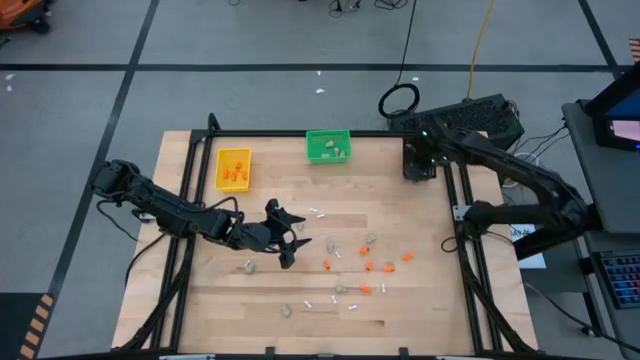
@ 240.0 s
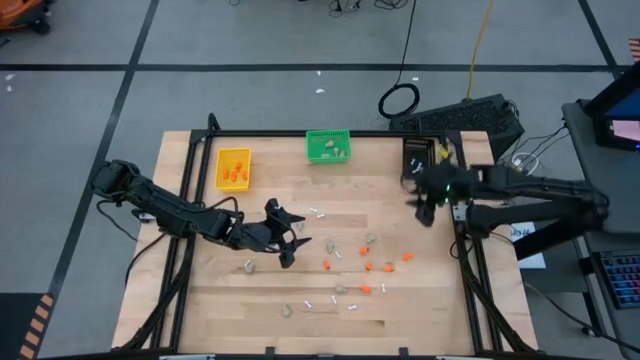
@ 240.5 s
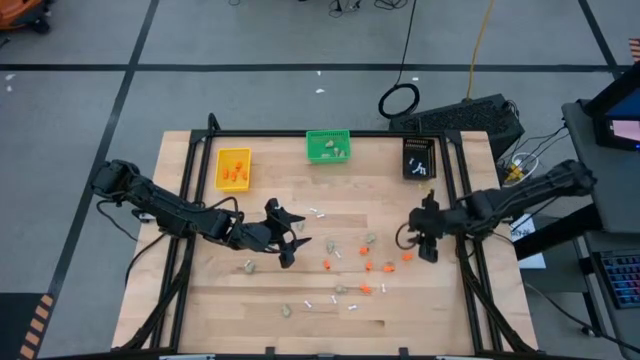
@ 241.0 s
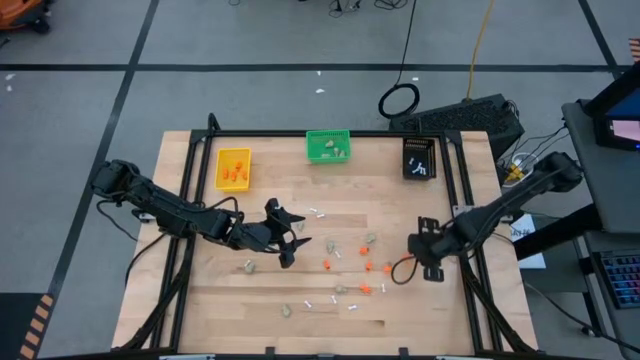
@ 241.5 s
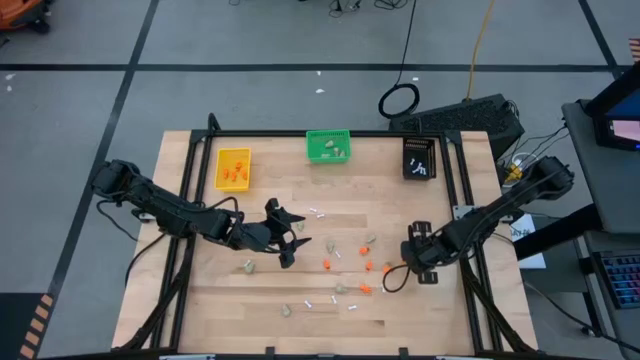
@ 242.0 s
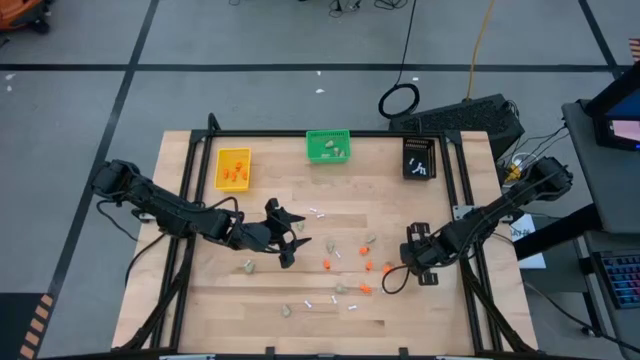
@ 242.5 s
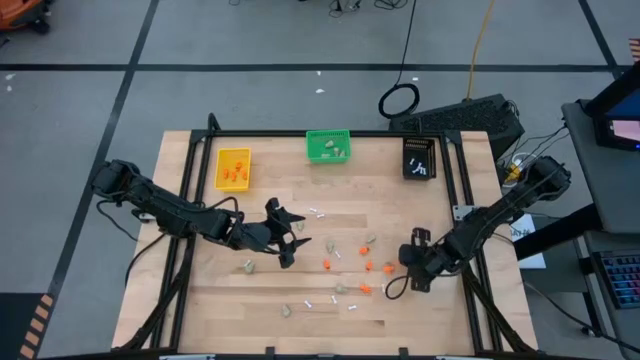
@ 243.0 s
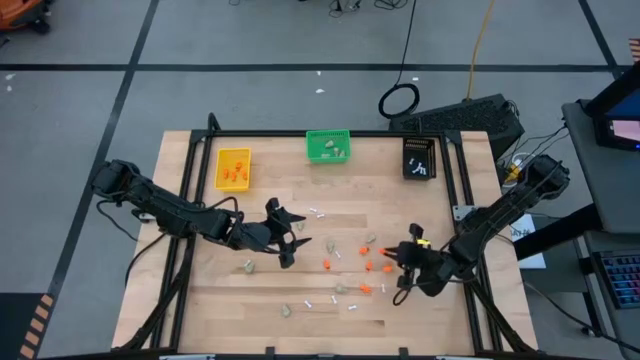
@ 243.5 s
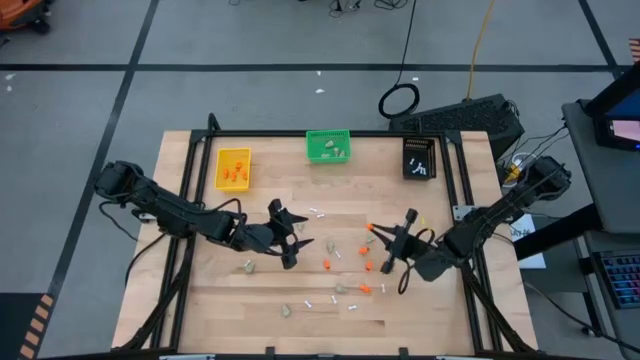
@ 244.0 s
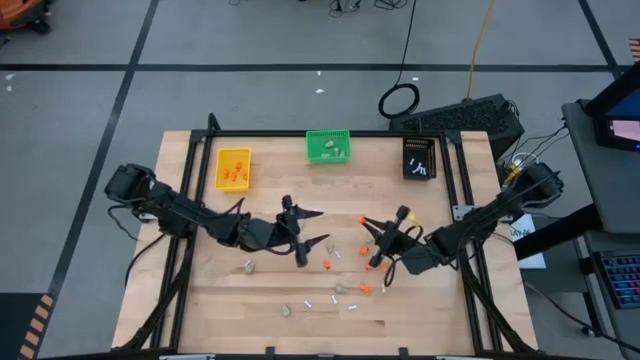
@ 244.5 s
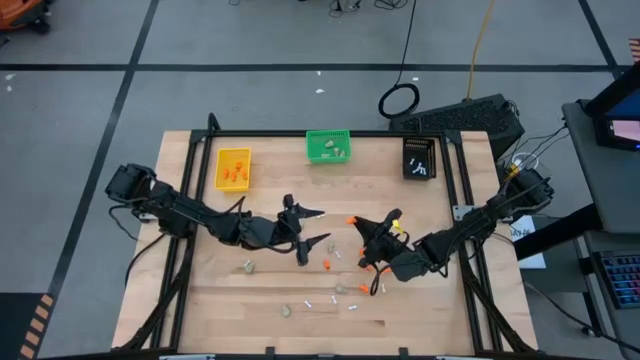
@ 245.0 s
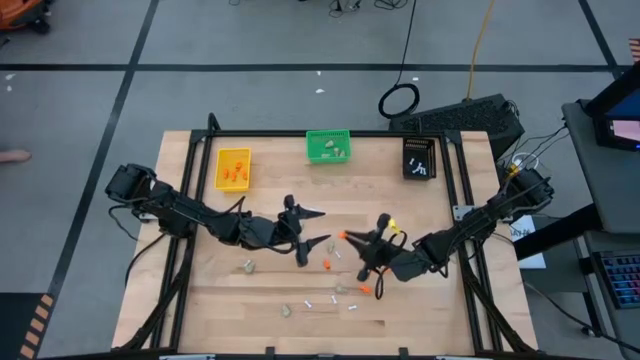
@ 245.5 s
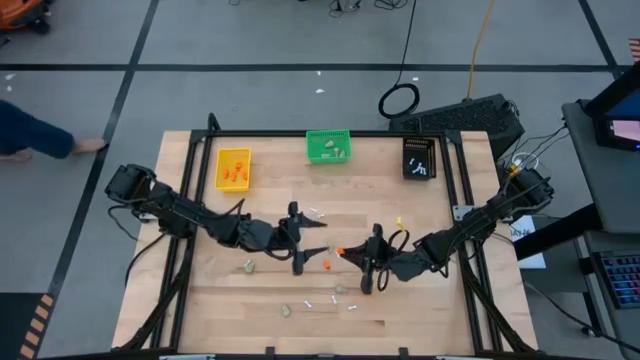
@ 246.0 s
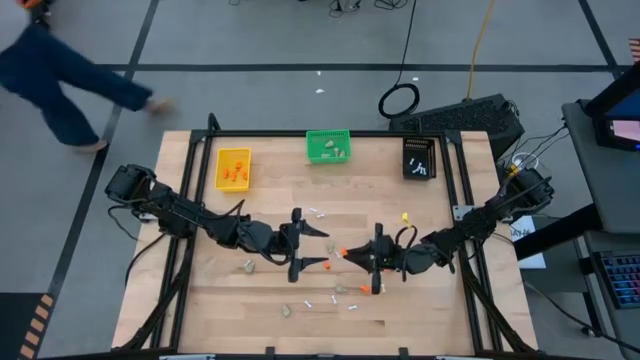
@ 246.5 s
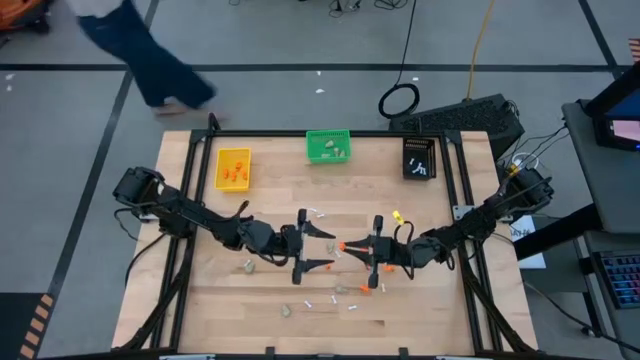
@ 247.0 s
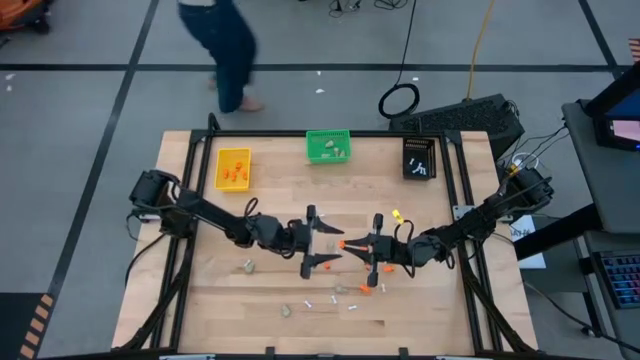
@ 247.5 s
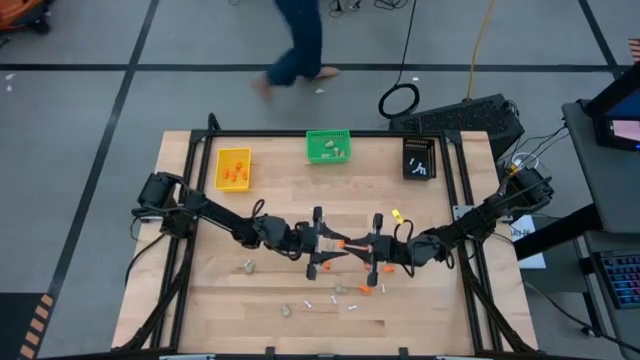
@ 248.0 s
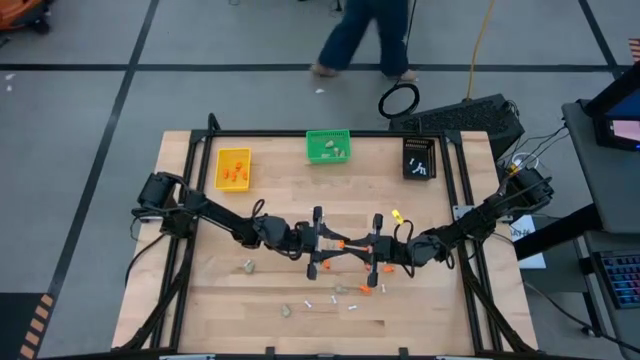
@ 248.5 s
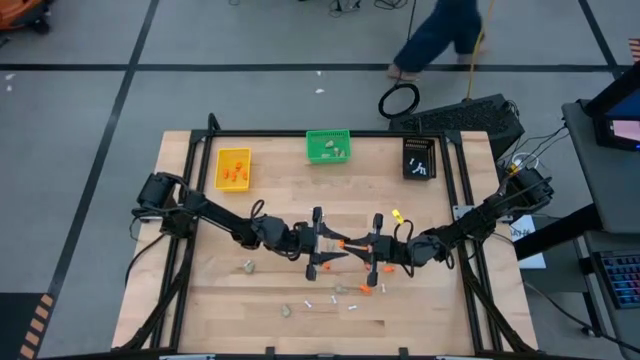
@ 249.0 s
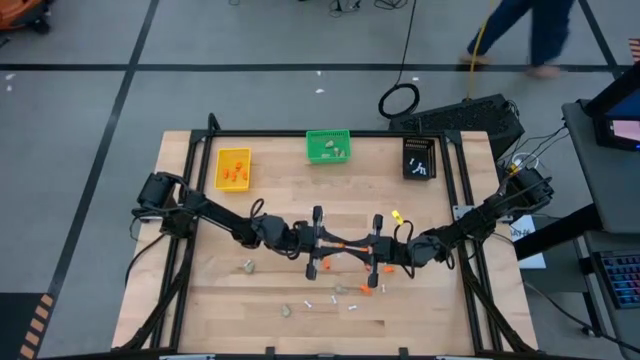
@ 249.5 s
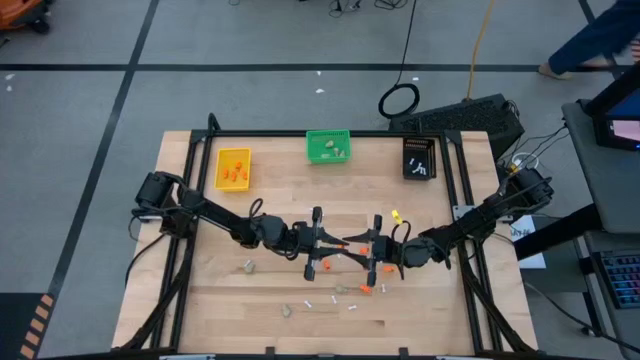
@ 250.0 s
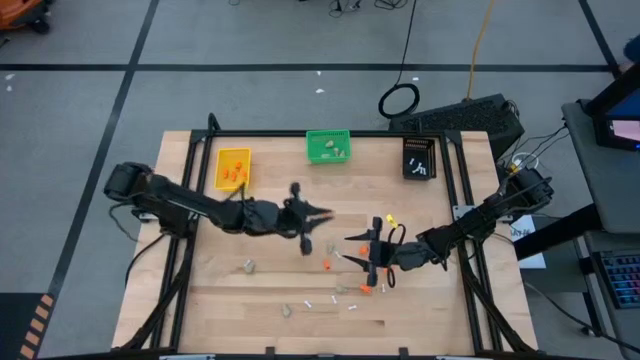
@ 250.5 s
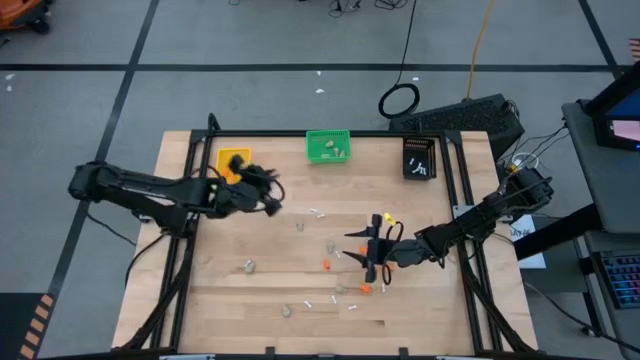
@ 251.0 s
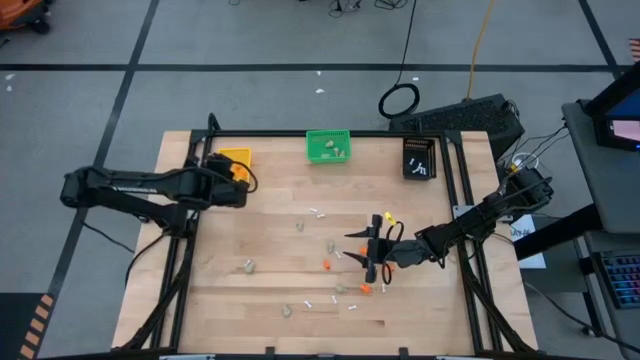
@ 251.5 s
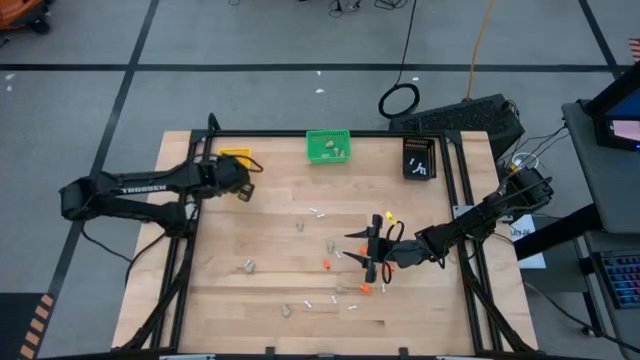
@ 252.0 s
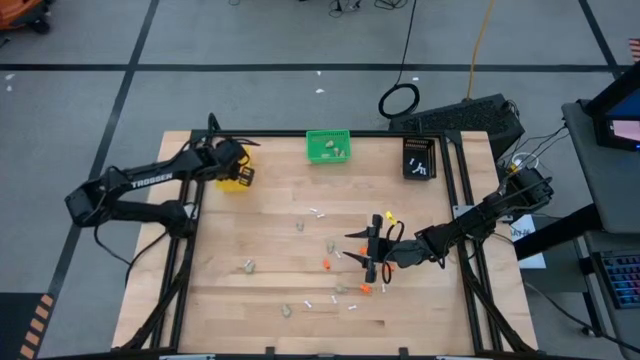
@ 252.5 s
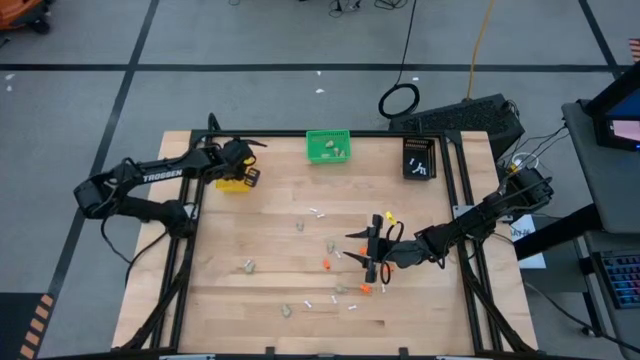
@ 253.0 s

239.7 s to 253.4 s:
Task: Sort Halloween decoration
Put the orange skeleton toy into the yellow bin

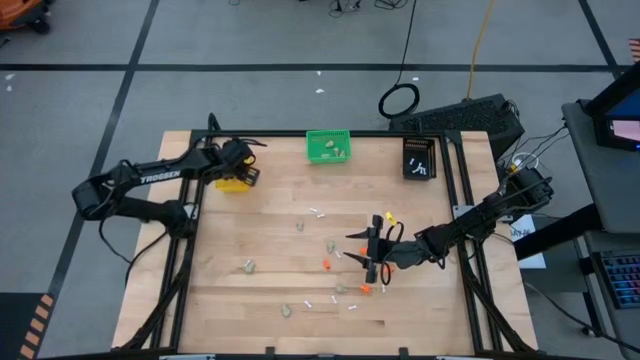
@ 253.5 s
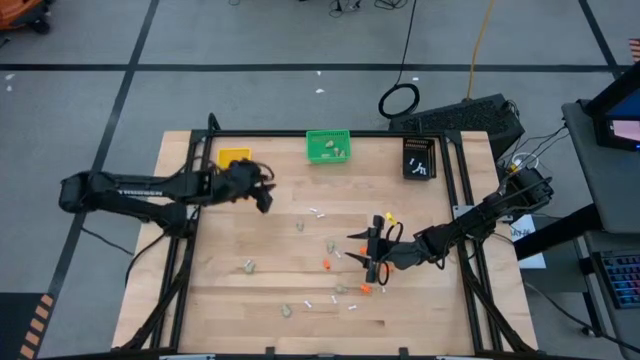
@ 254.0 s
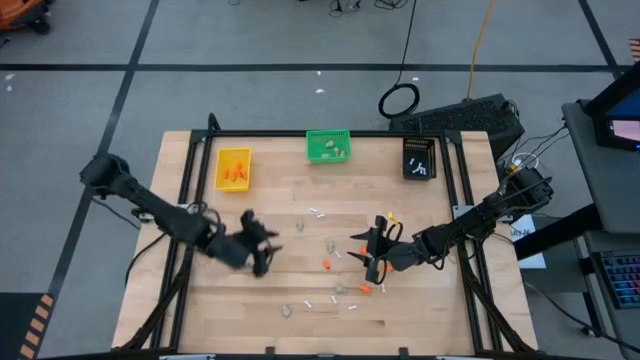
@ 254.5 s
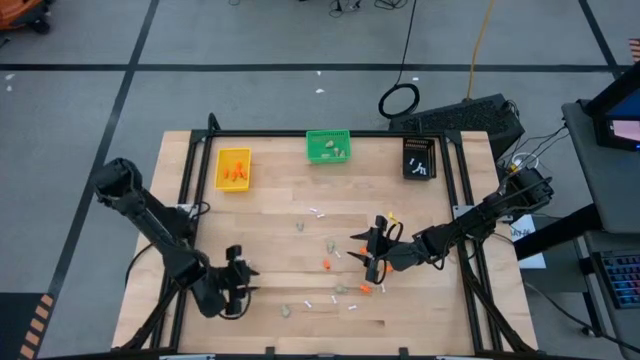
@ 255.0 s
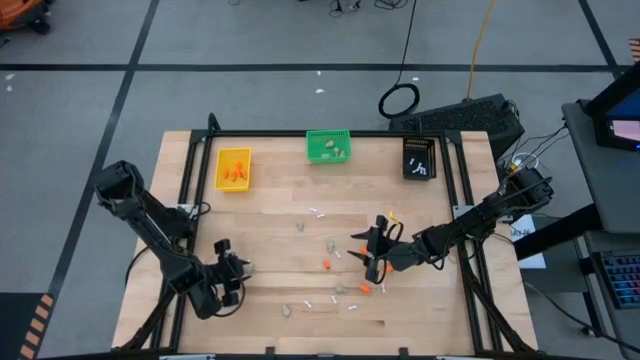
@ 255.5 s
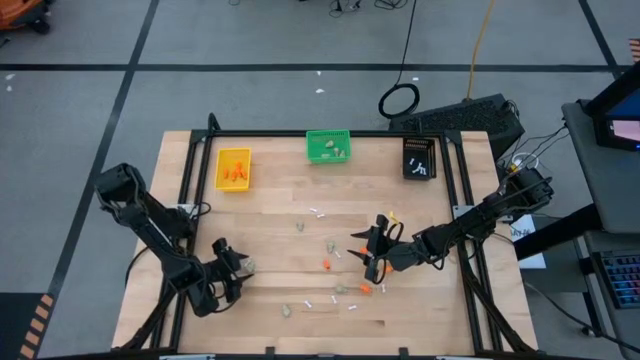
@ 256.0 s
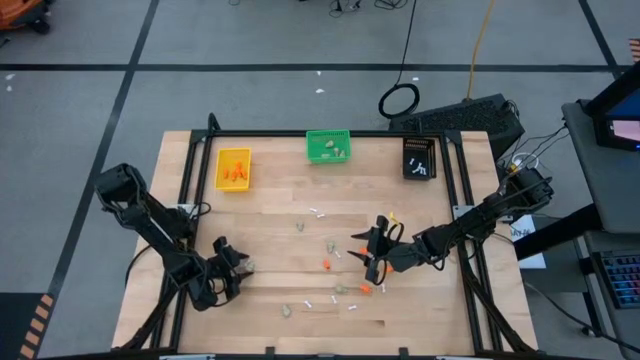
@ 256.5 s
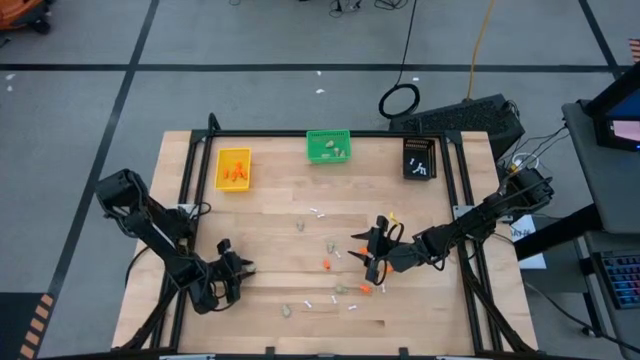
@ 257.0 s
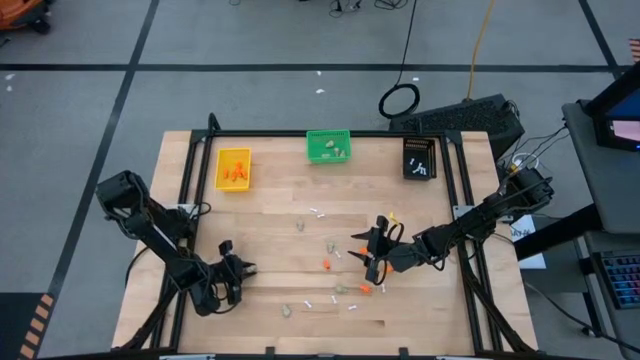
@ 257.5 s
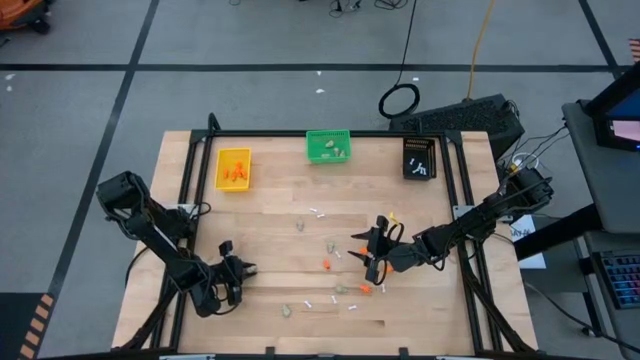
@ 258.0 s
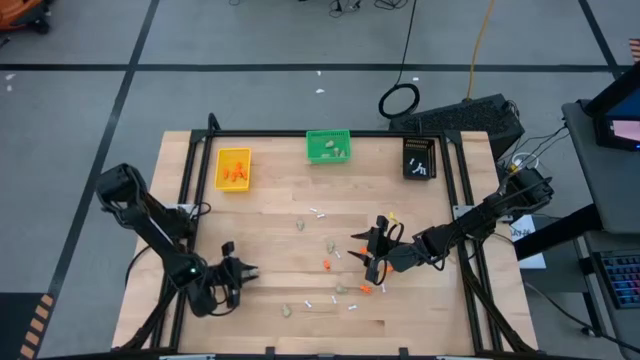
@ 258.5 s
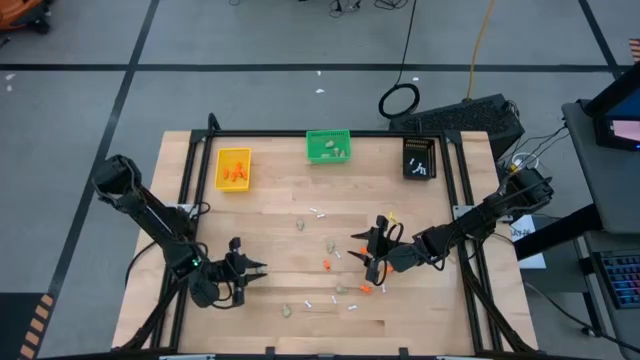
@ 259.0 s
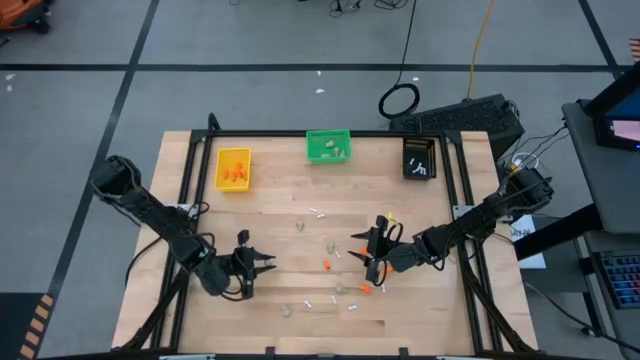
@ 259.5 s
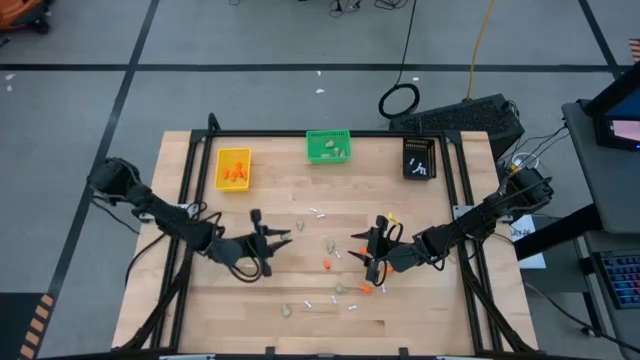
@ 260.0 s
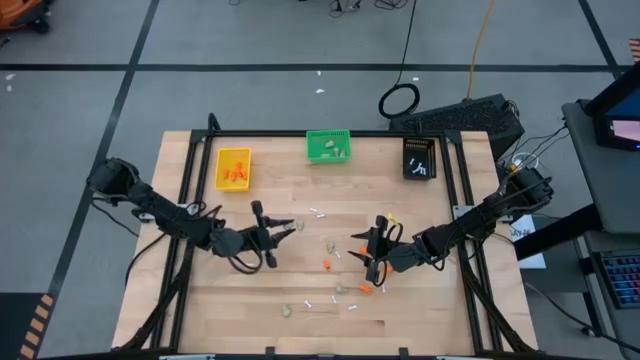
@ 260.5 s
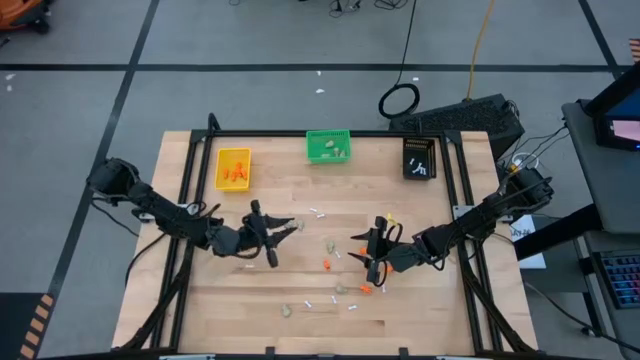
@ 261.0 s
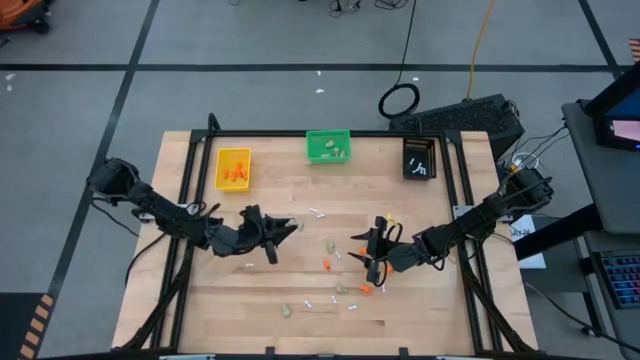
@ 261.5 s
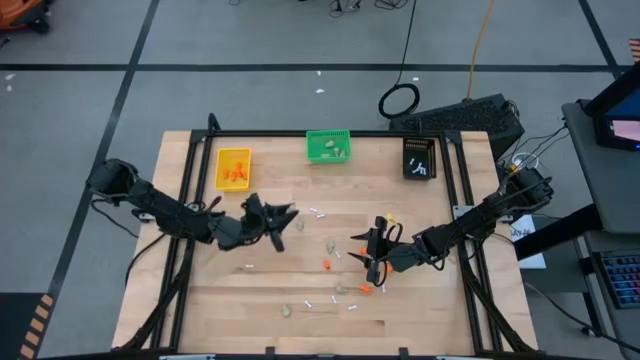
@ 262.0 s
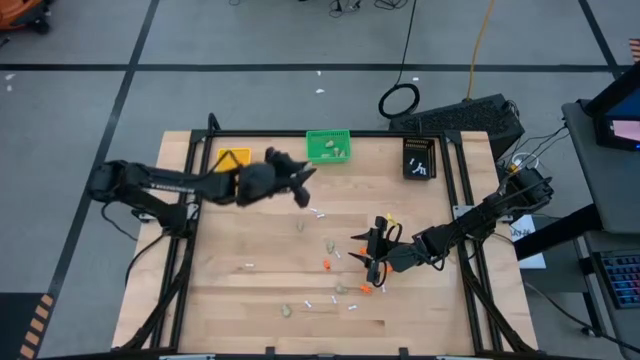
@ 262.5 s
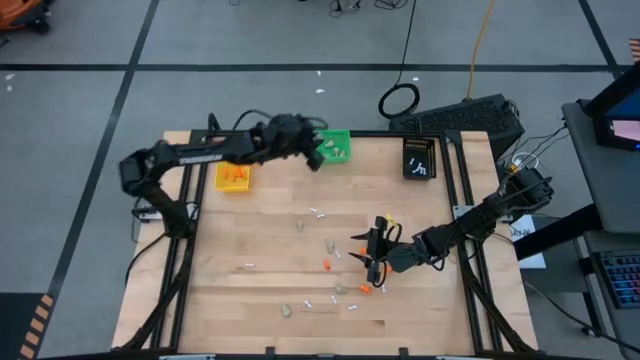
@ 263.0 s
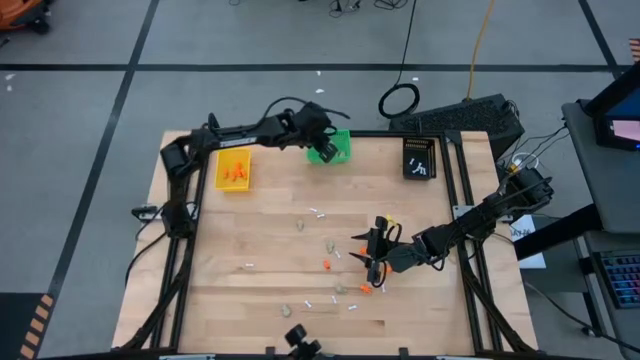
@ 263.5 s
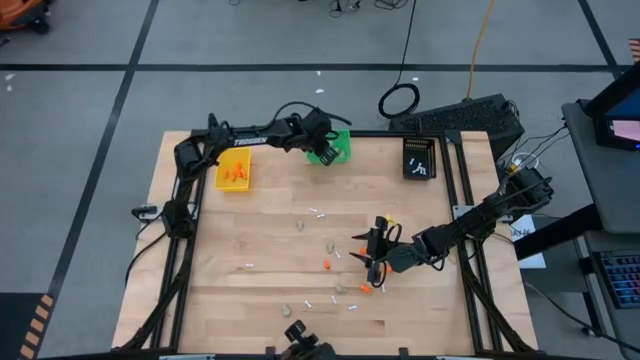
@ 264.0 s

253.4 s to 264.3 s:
Put the gray skull toy into the green bin
